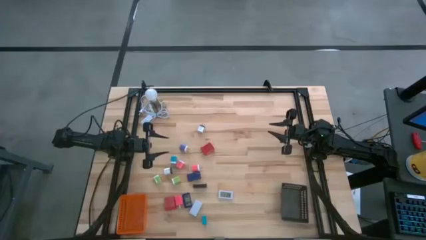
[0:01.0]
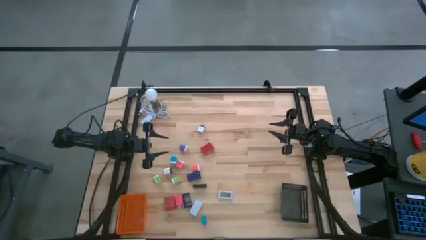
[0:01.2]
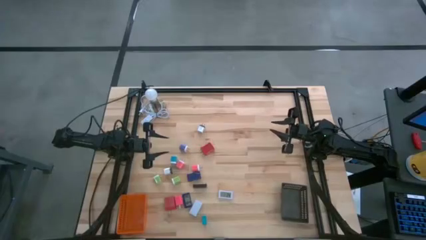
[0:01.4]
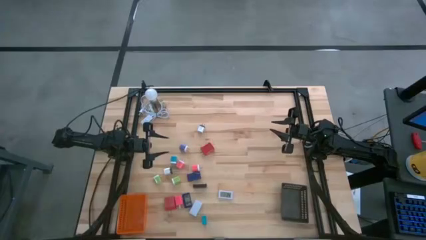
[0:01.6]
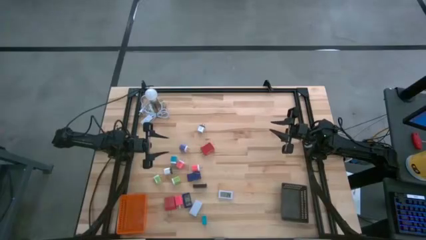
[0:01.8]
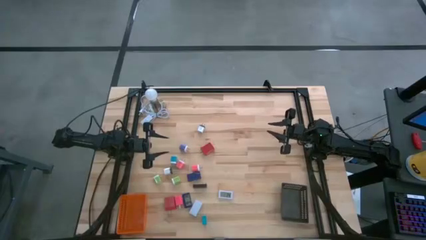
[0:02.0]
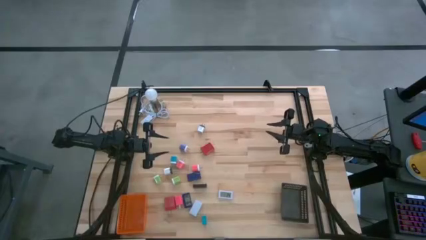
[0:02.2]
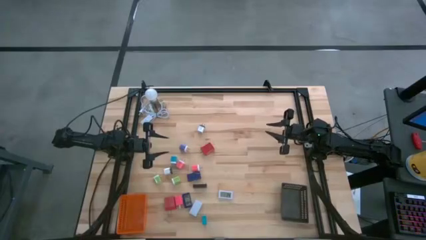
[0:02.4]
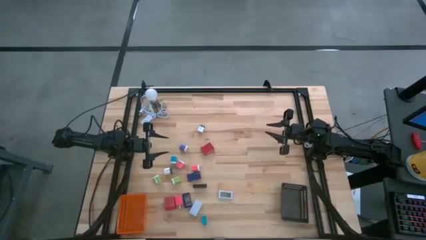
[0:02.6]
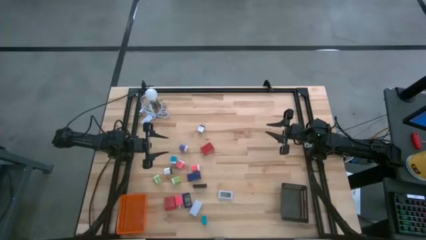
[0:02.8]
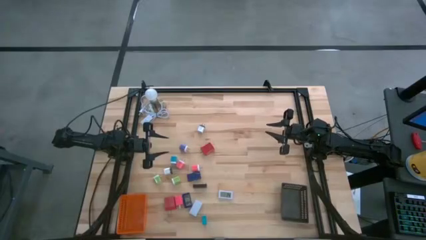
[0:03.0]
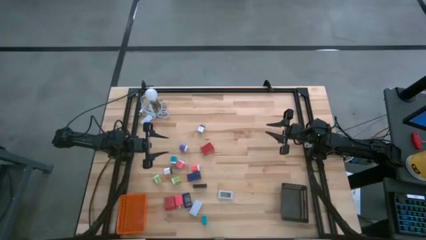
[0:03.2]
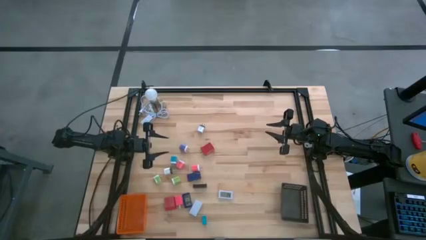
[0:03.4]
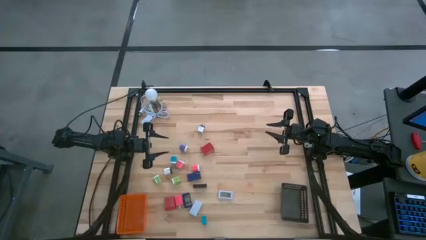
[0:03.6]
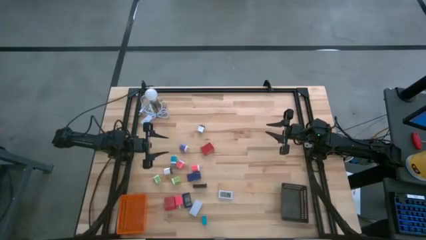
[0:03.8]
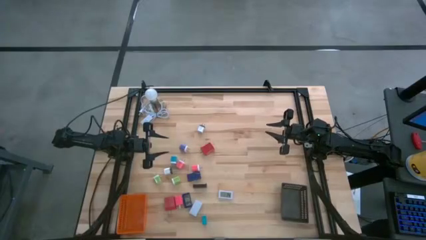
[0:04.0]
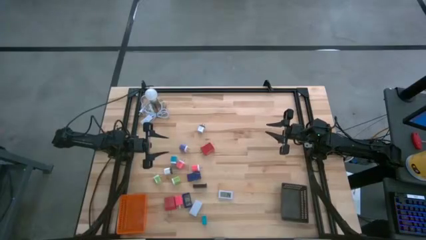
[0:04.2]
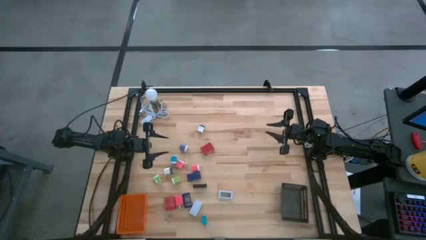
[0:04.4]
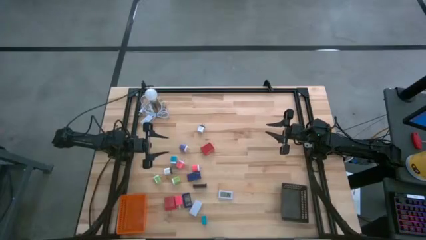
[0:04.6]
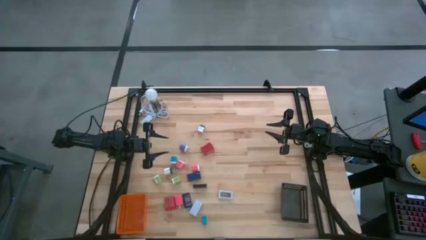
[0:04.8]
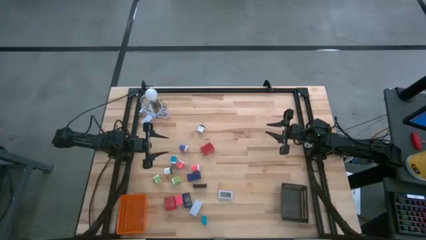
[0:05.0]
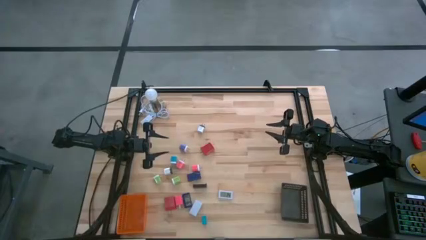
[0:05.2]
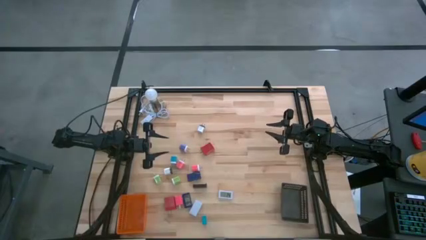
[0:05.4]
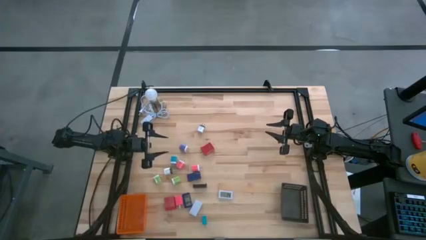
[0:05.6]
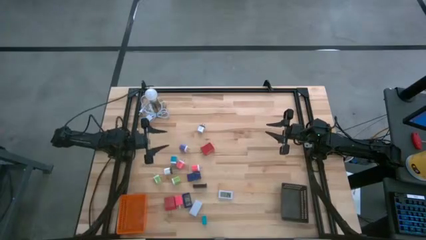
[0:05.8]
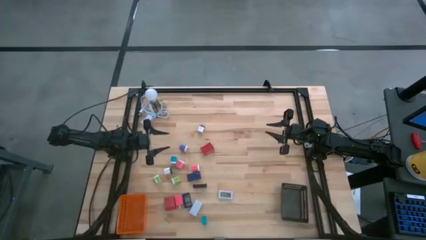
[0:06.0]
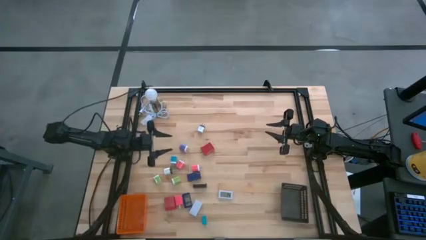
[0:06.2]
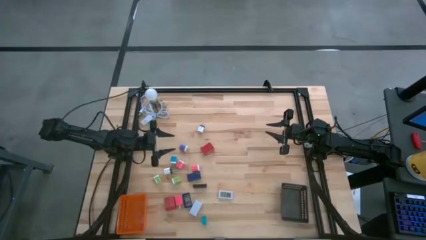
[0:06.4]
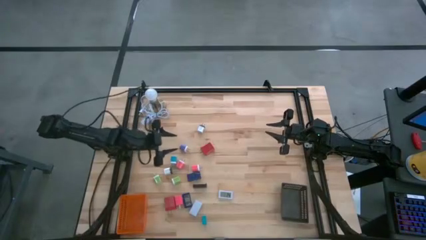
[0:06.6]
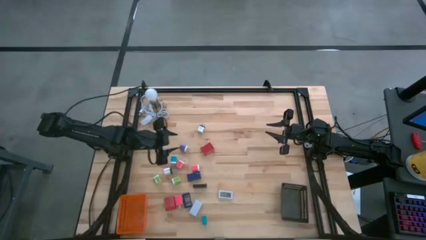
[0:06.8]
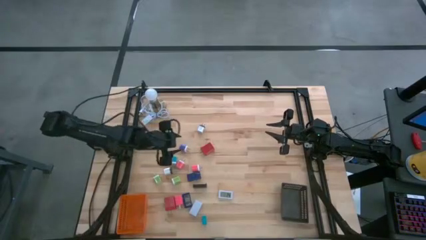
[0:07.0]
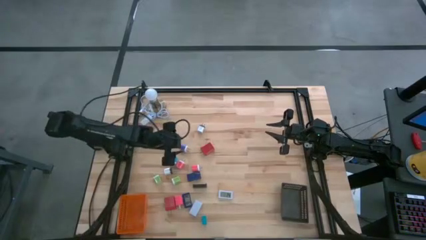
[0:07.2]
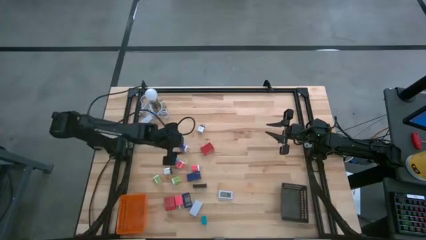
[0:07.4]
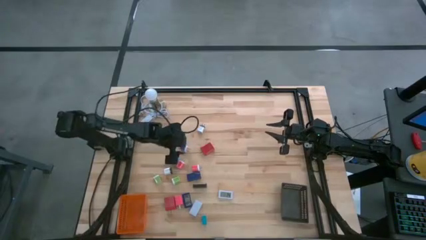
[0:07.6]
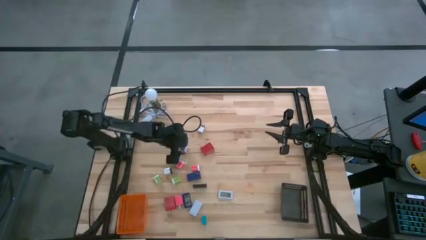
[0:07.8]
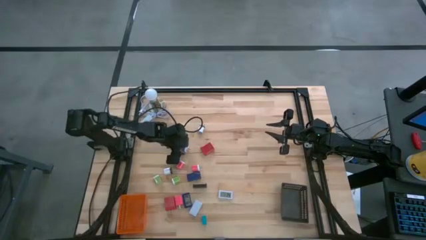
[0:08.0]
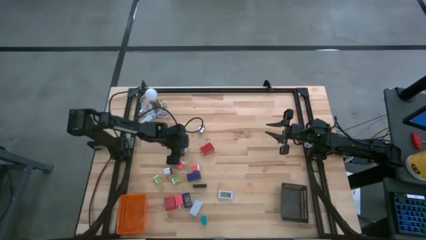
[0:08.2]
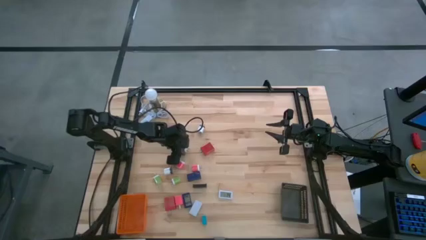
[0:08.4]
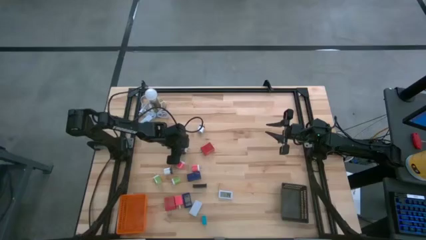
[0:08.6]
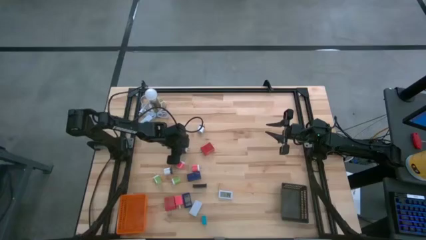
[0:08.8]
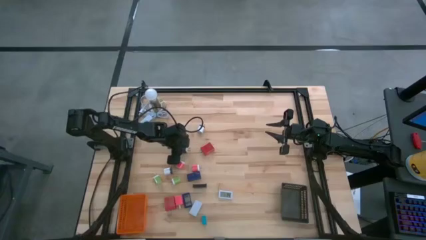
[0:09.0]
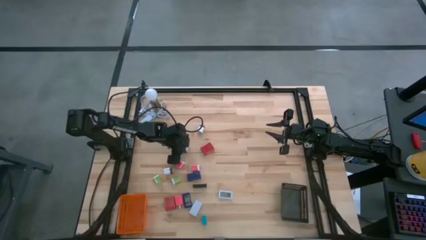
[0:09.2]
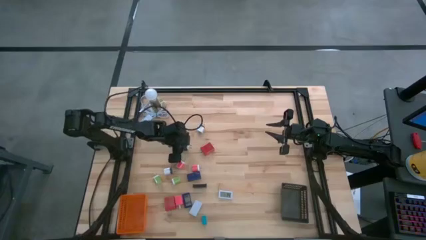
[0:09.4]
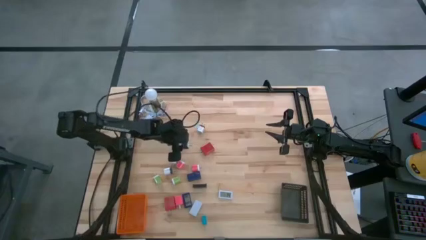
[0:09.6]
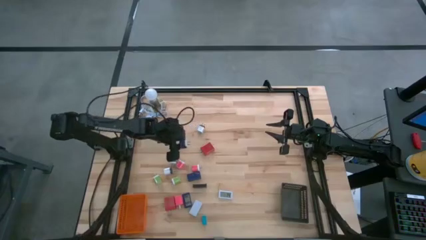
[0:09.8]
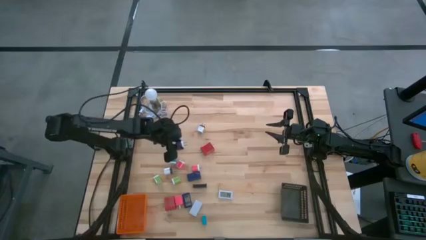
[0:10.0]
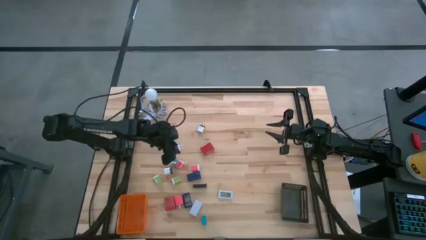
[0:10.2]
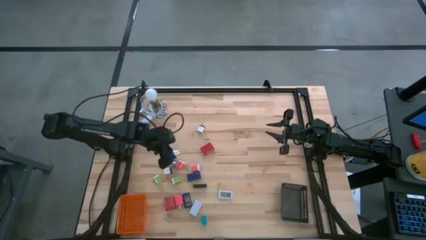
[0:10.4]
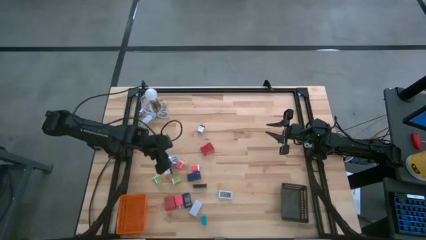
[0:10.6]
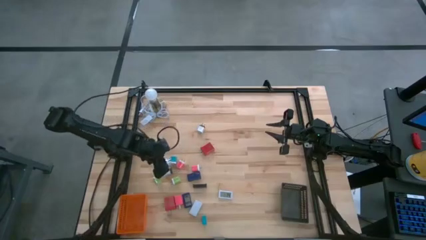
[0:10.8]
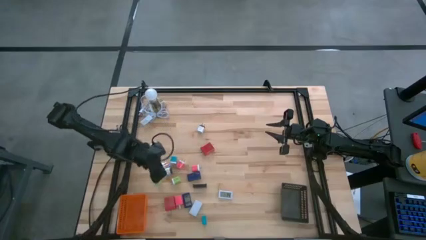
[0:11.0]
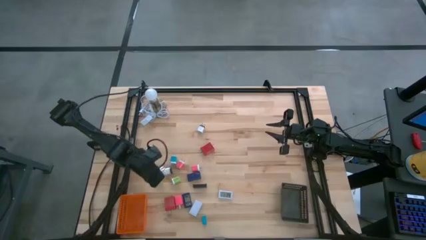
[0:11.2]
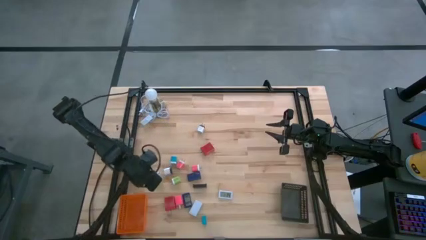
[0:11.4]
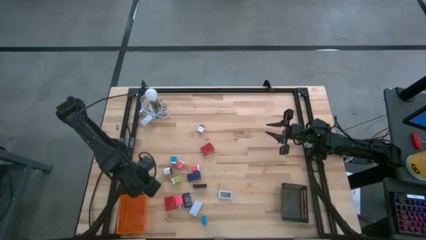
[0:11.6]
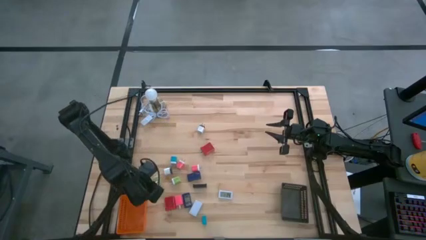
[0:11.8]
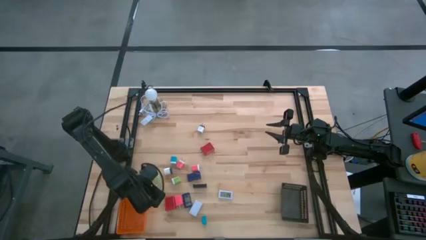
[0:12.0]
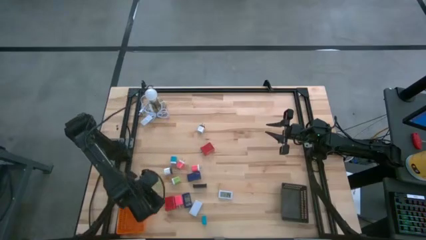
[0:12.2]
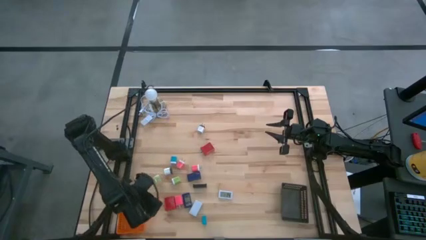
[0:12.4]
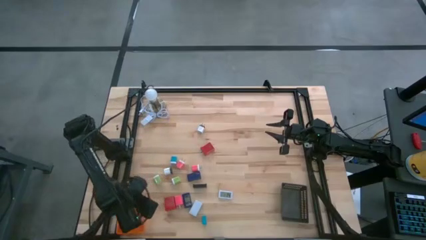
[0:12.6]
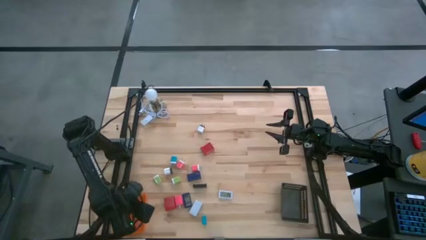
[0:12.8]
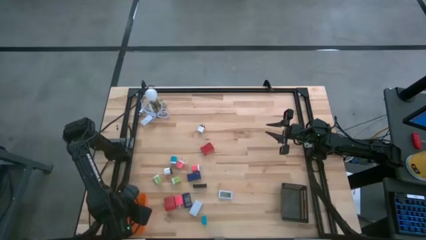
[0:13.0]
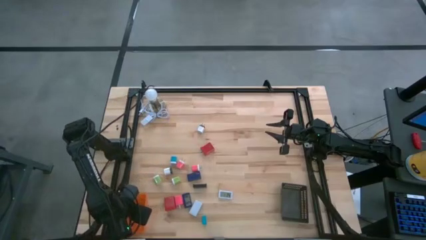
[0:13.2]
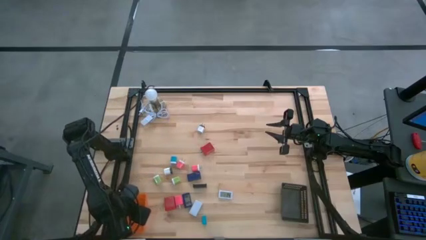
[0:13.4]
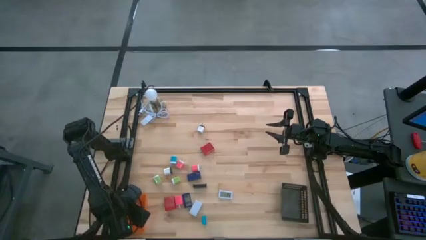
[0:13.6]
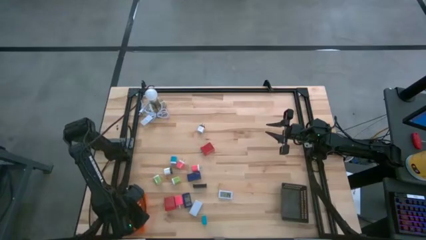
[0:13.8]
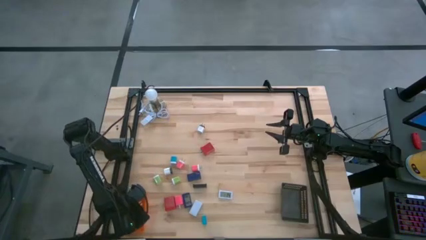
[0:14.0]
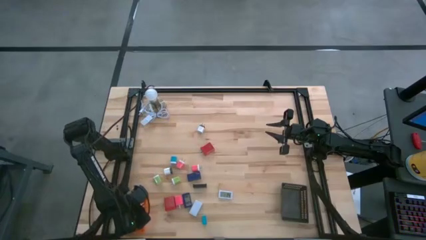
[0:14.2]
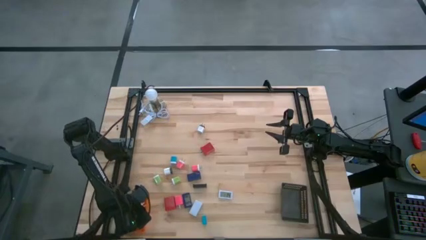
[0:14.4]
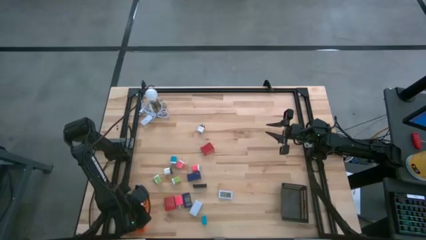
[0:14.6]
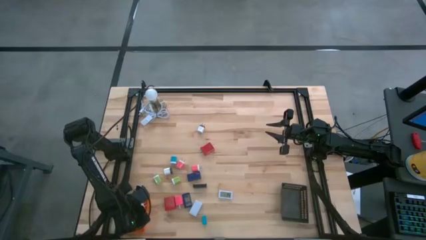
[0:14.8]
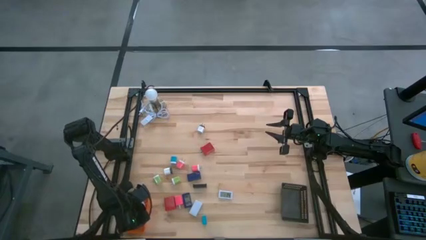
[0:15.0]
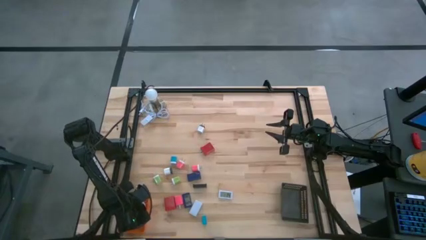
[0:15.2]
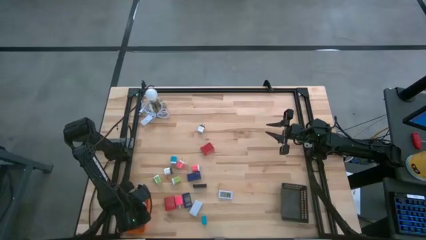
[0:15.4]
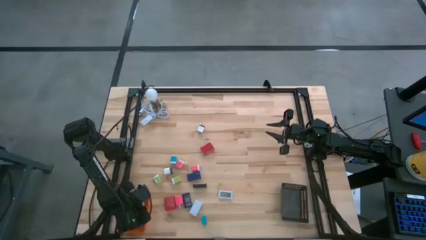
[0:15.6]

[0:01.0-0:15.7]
Task: Pick & Place Office items
Put the purple charger adapter into the orange bin
